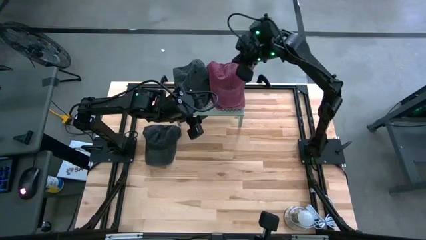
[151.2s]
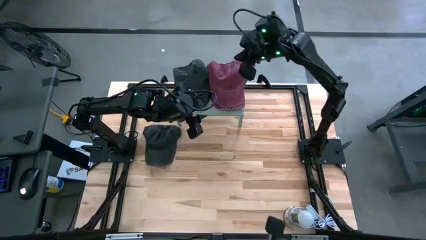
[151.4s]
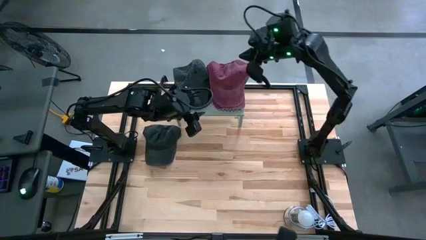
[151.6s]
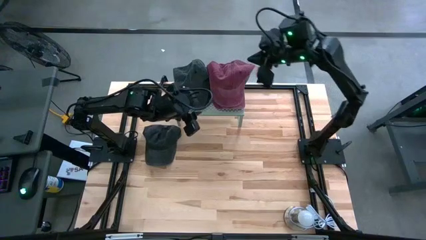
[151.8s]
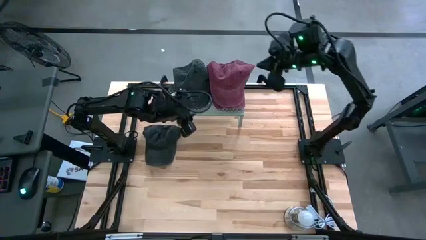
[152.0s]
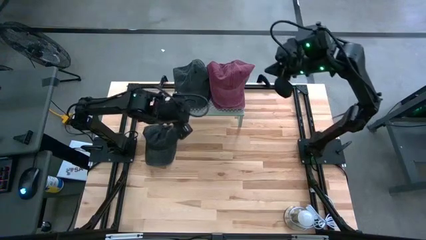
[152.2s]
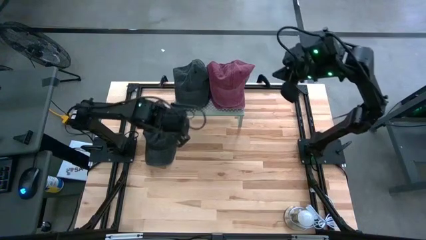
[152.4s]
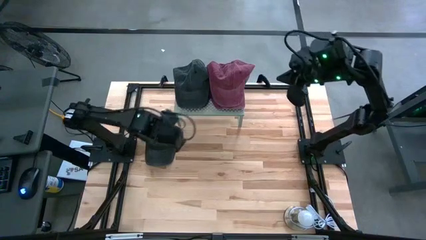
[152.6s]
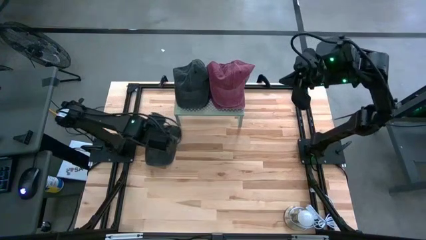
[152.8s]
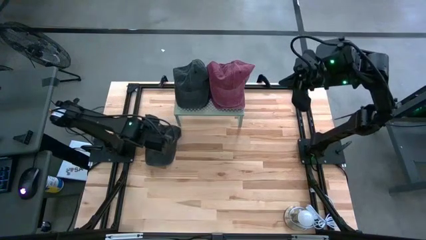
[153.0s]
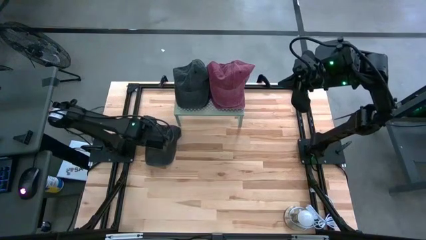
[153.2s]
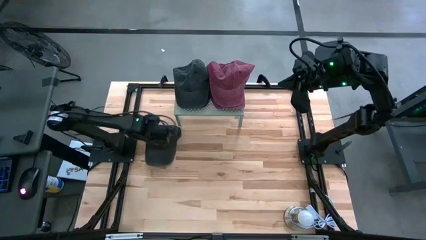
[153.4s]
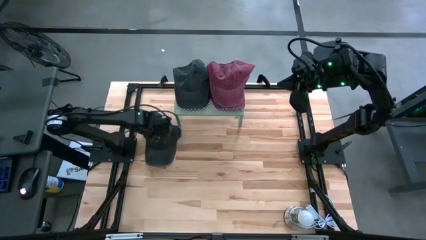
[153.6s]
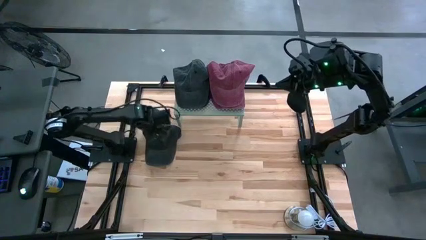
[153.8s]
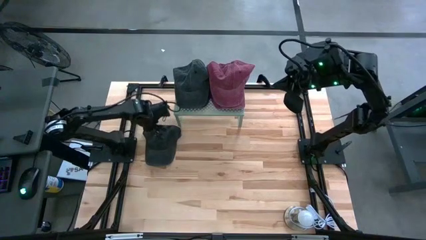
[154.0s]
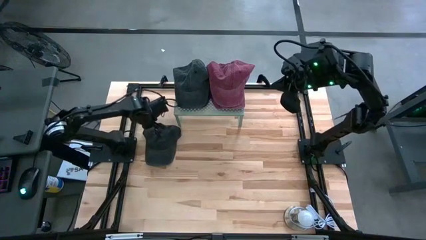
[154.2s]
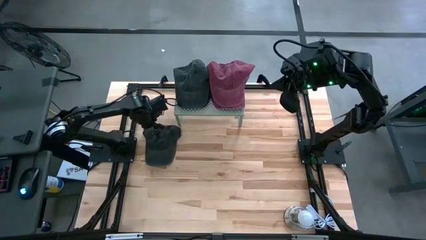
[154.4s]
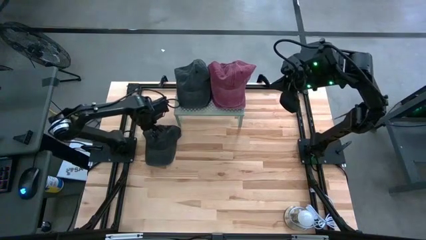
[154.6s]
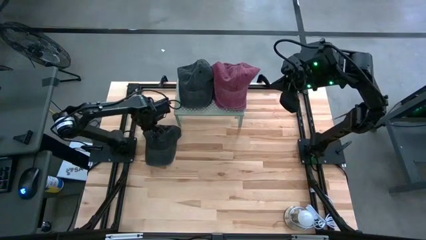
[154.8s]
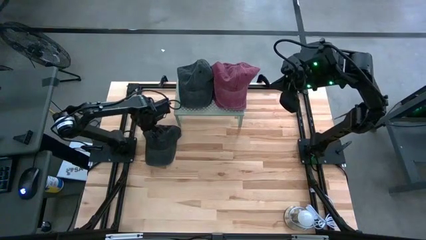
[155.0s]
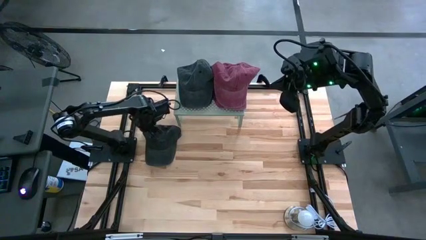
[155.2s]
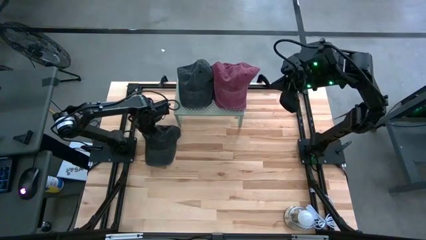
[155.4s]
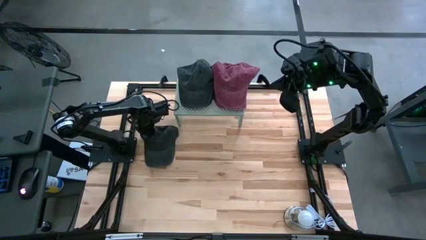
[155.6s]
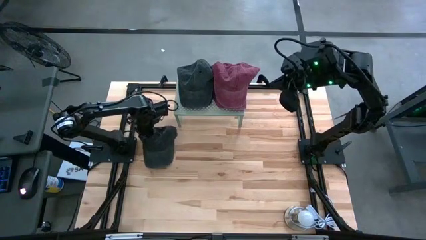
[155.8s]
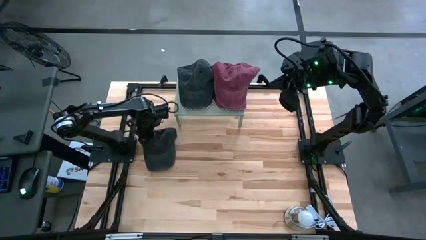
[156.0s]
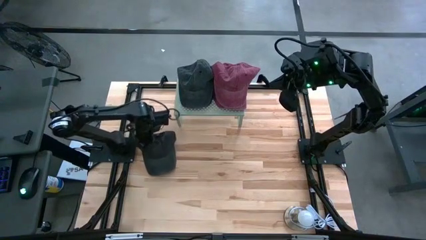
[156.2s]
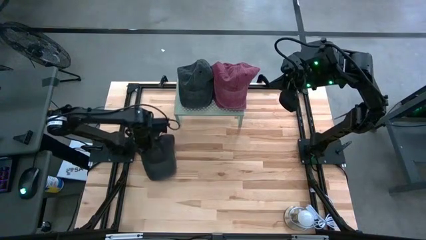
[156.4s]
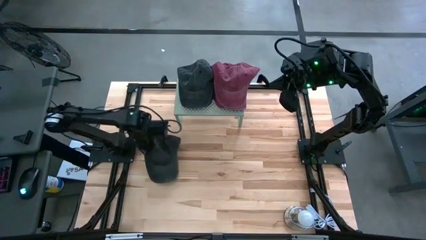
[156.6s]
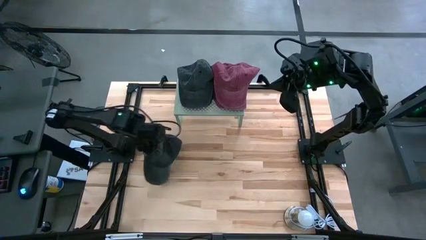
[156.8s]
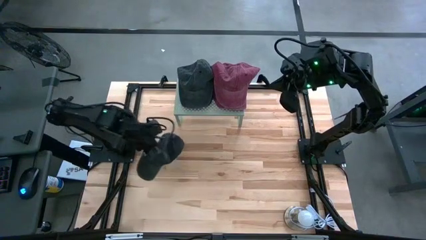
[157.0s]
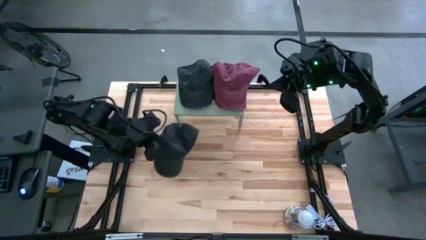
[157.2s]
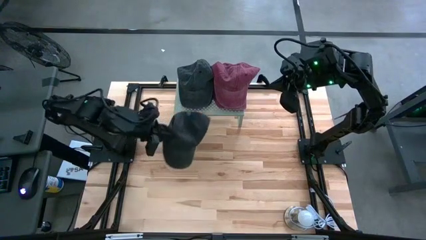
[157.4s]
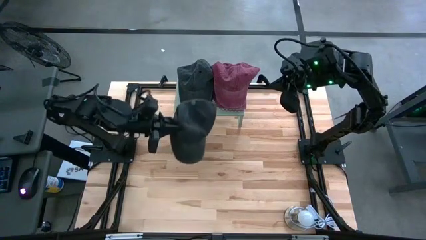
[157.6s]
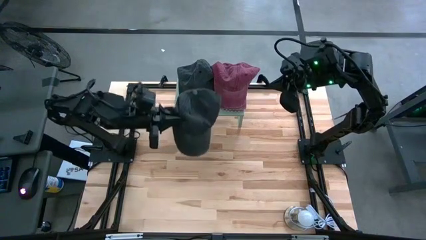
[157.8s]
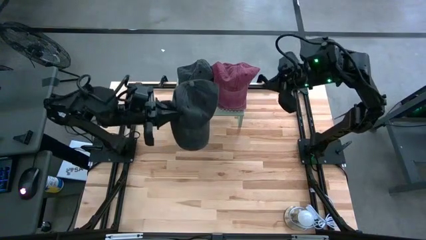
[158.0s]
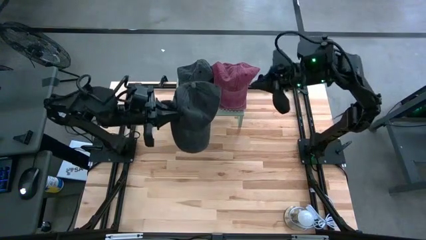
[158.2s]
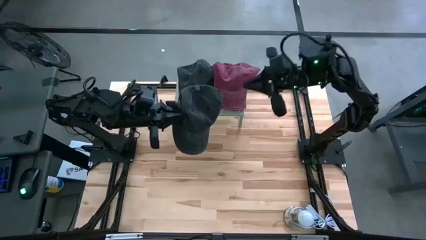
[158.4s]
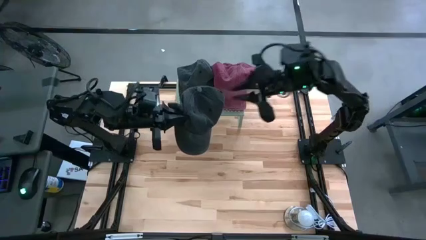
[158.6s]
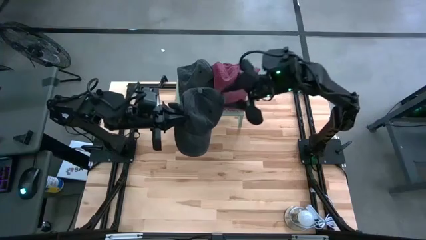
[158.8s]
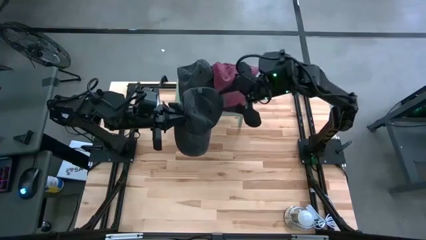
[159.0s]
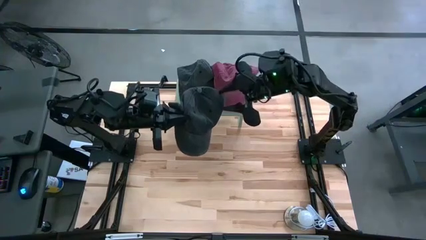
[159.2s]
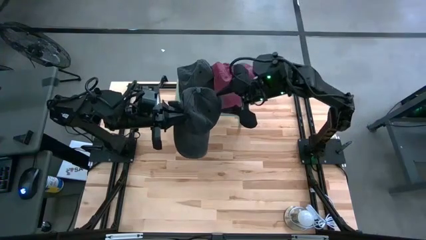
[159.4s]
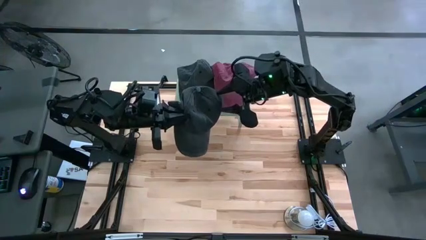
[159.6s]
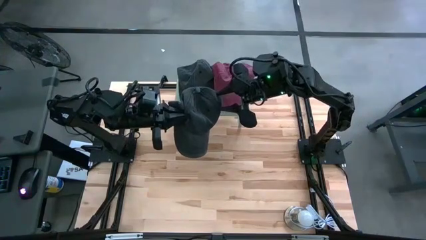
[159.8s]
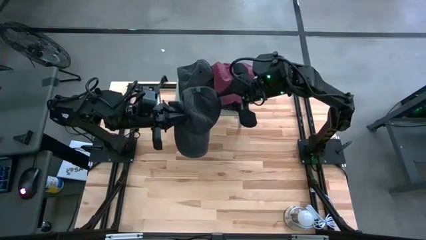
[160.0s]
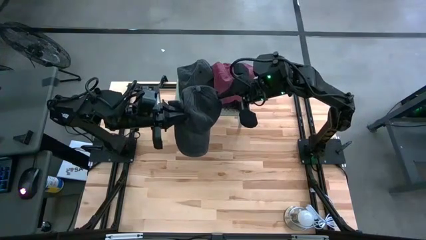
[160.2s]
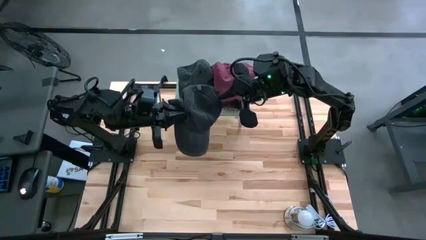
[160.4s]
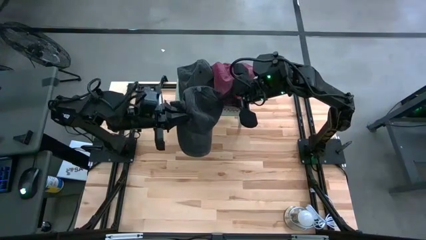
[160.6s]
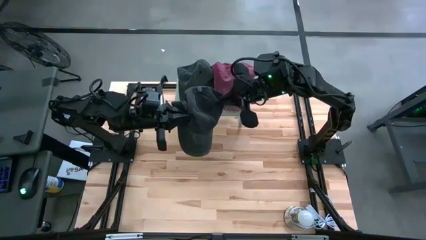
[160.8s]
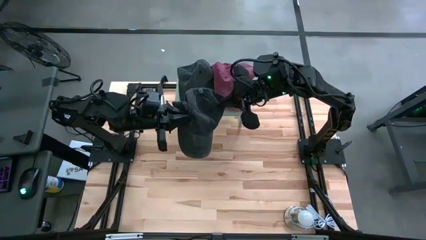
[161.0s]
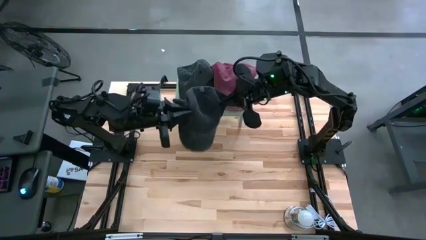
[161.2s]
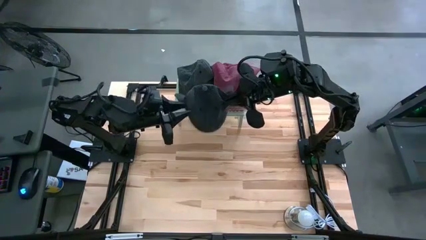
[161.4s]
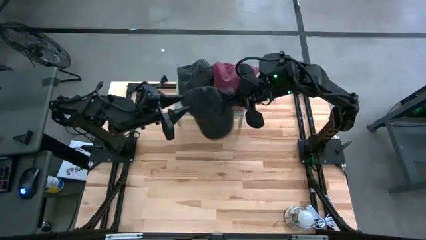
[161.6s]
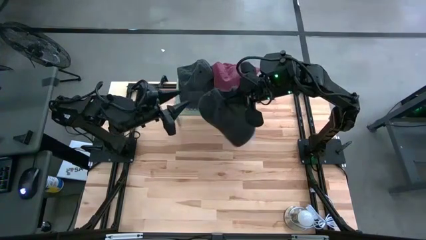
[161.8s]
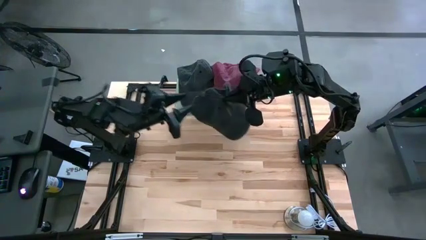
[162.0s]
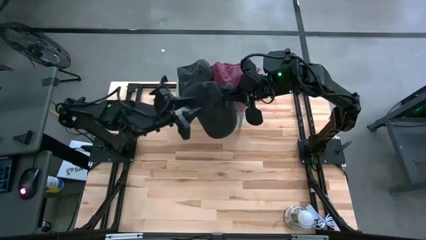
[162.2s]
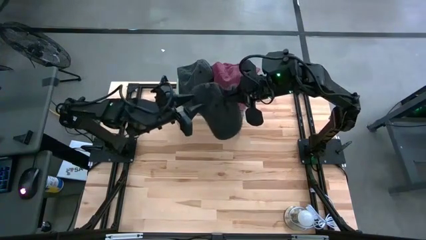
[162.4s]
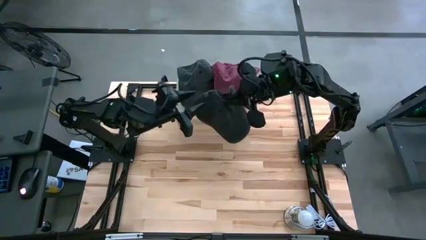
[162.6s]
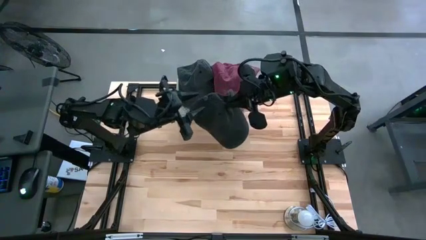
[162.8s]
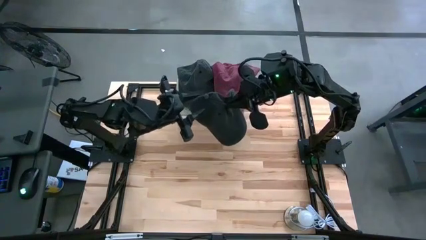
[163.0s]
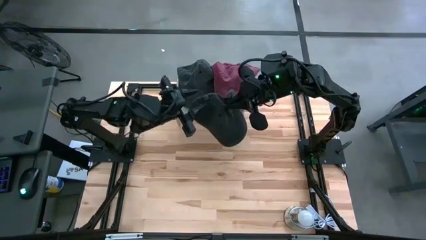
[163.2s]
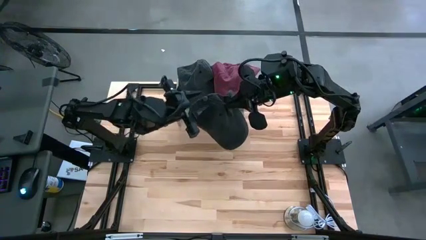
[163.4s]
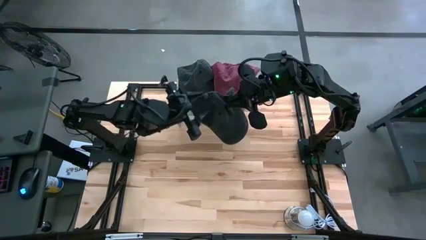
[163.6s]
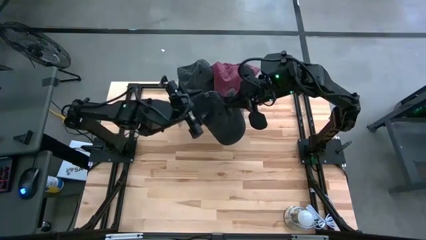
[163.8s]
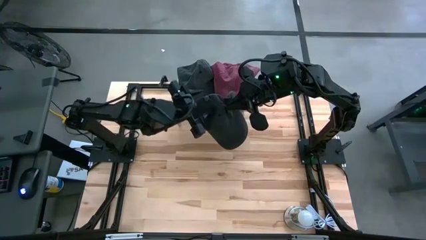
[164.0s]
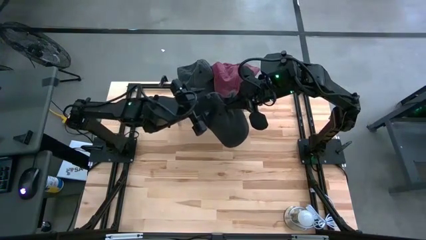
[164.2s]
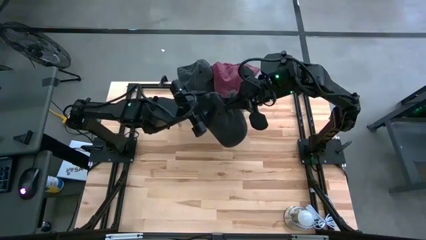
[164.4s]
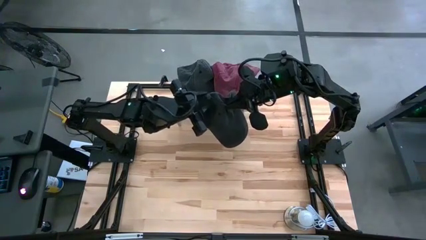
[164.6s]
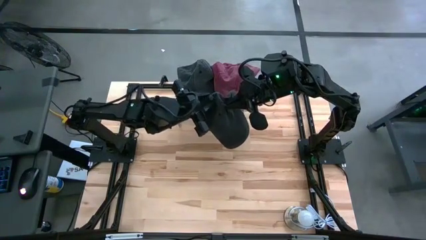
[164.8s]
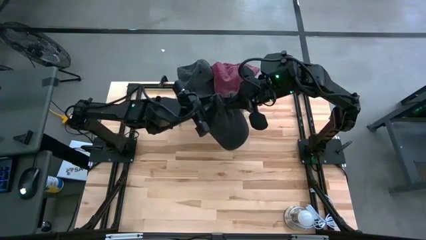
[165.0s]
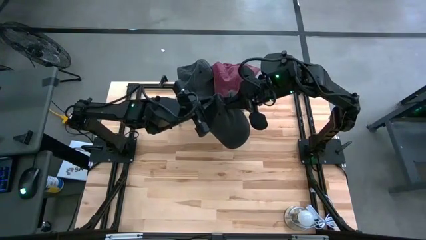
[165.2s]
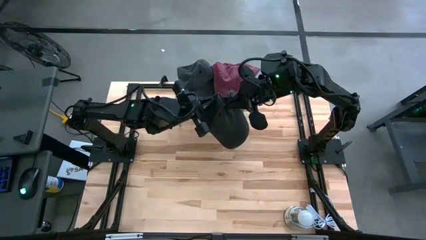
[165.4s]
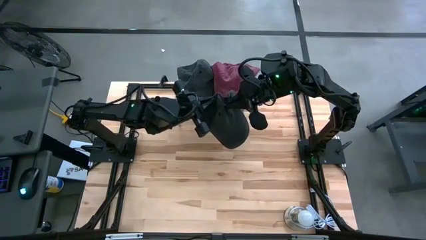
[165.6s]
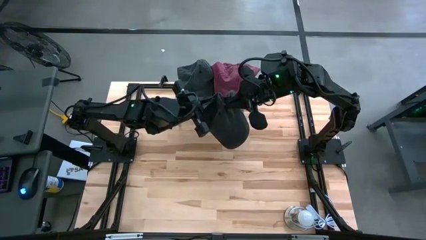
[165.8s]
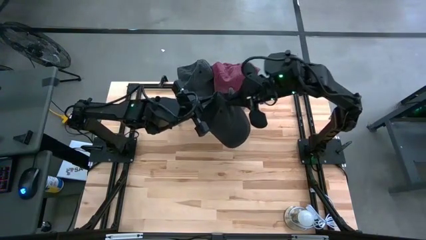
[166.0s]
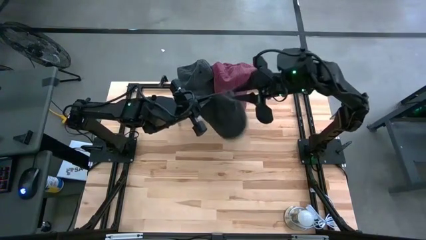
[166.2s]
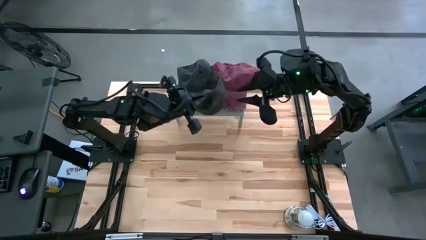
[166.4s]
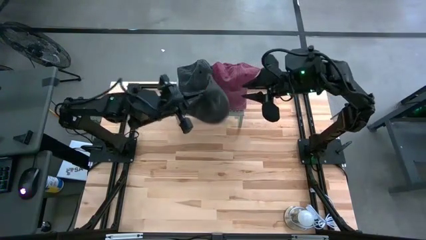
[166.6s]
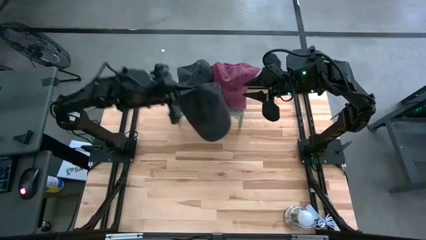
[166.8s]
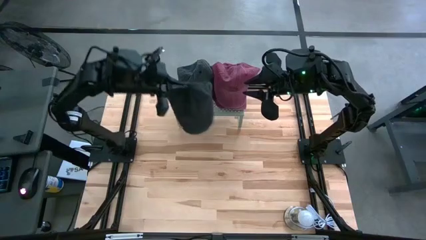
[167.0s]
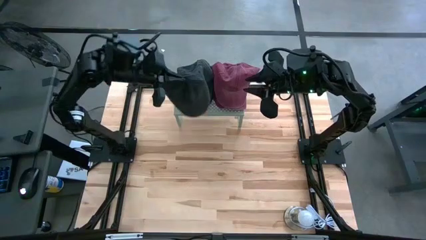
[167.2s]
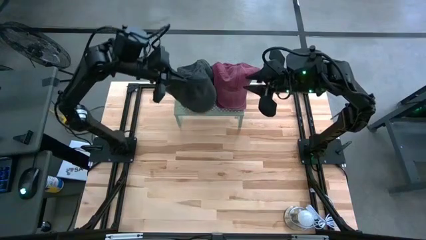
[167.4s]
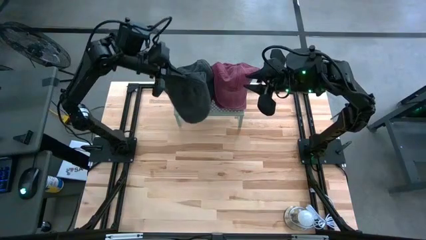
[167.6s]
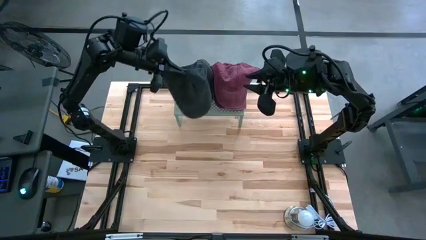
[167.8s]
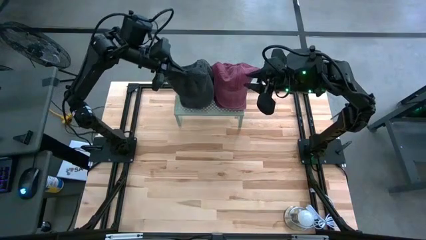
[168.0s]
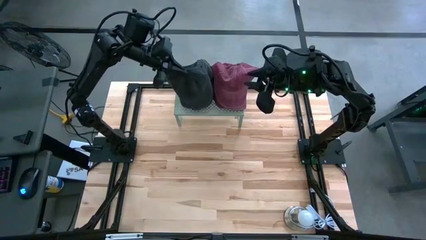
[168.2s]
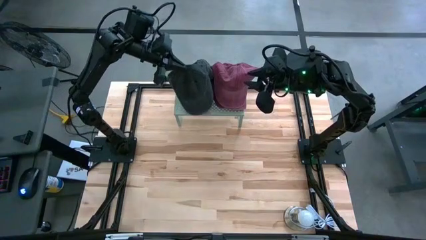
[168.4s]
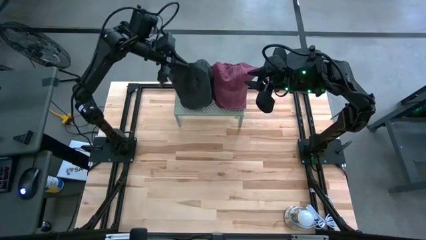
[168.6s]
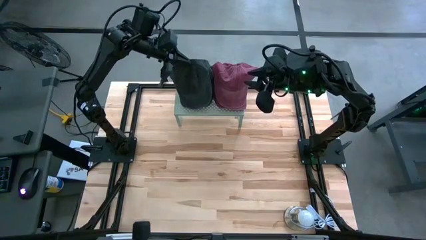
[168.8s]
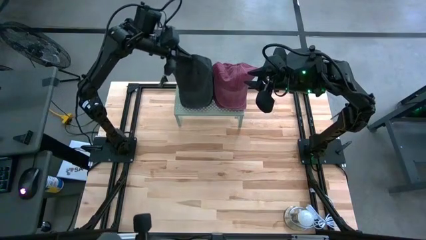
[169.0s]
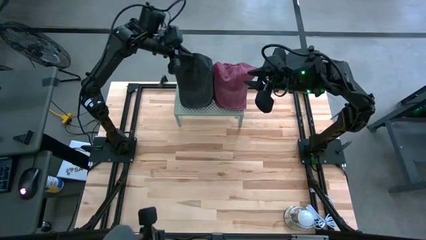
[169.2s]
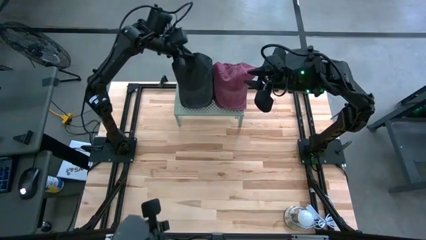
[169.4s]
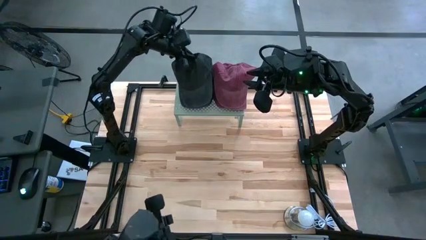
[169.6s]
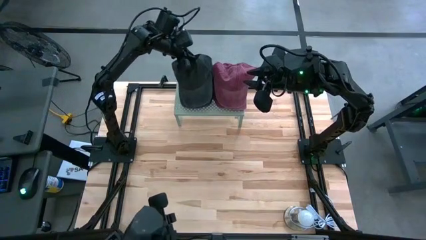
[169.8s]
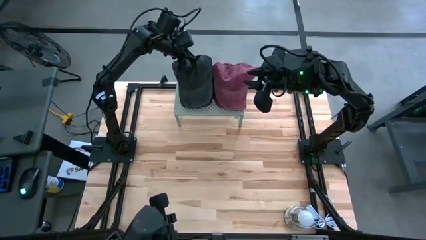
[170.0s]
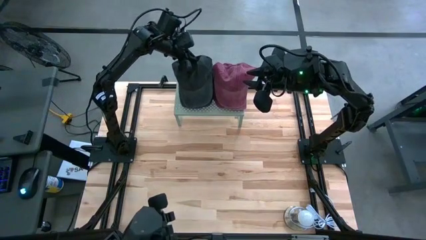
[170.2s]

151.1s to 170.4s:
Task: Pick & Place hat
Stack the black cap on top of the black caps on the shelf
